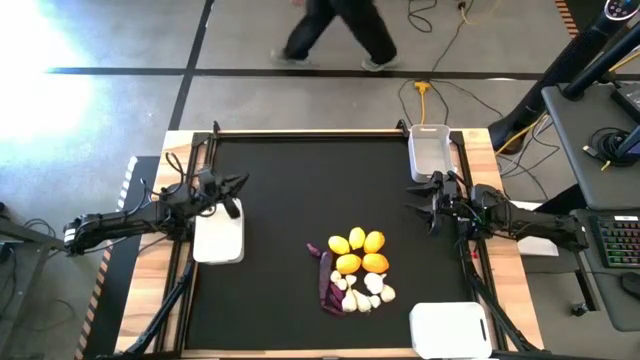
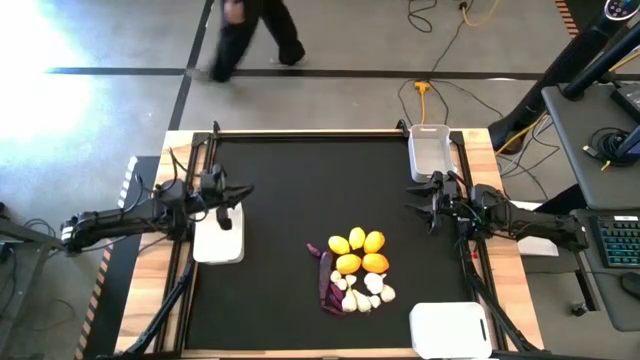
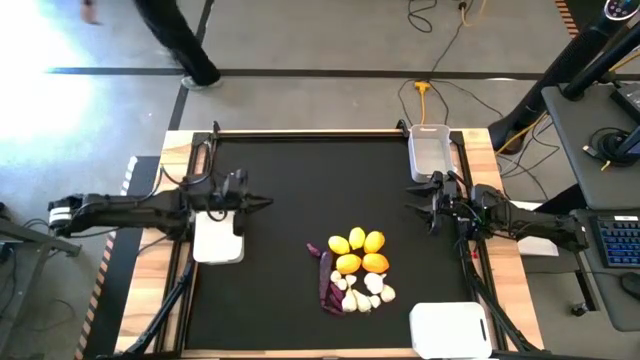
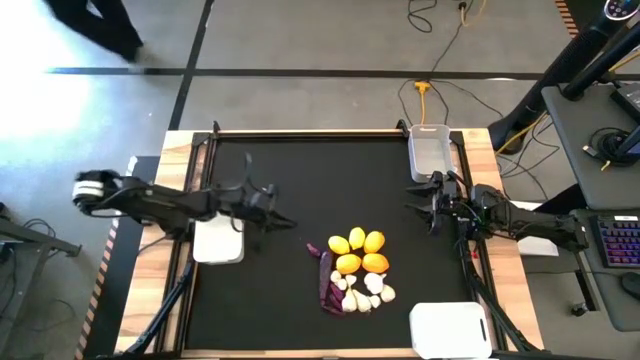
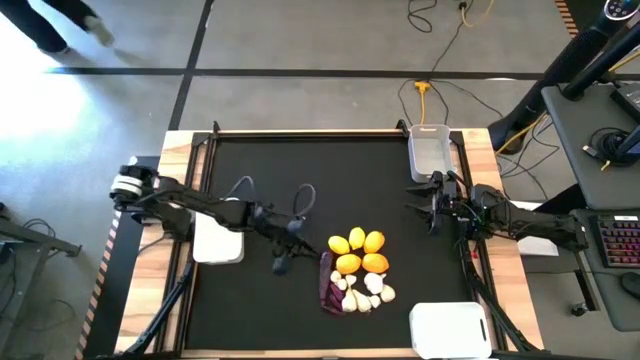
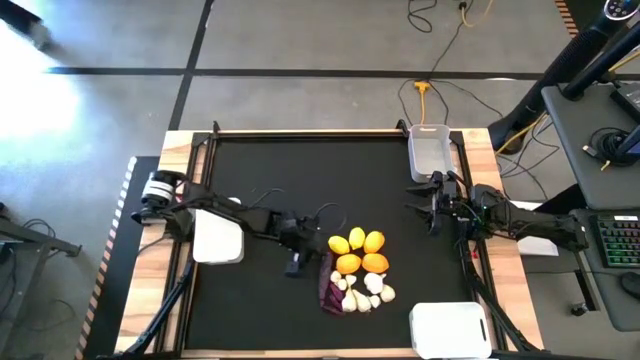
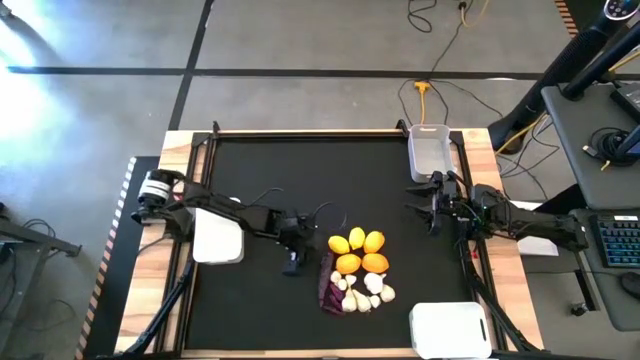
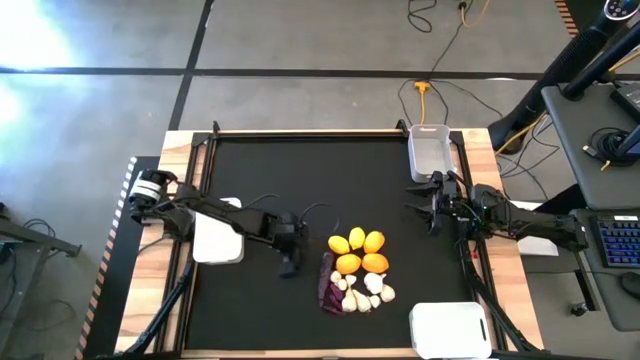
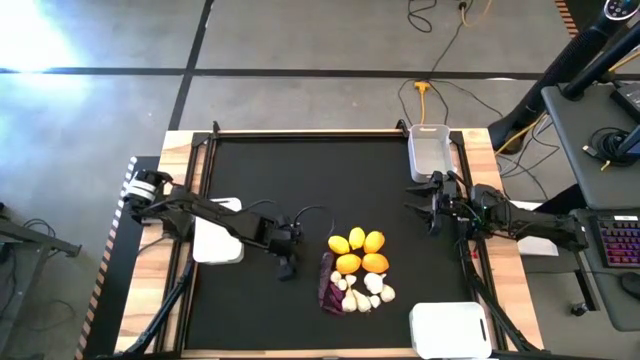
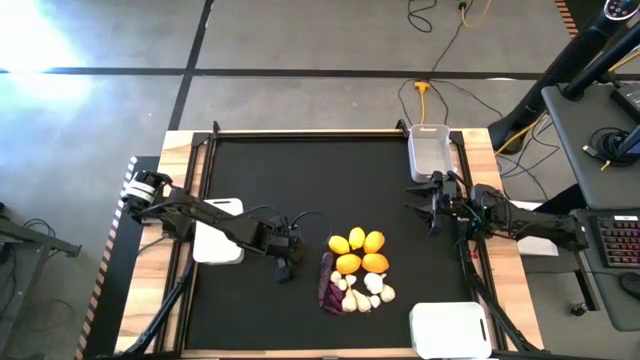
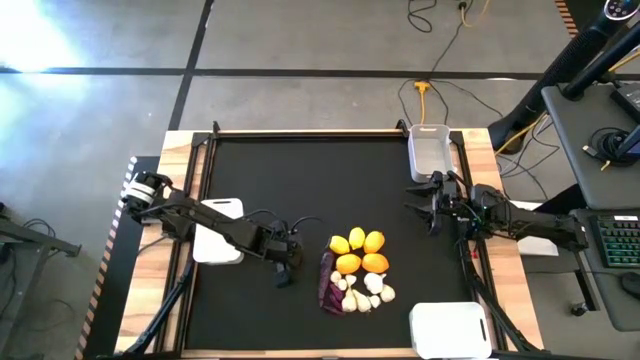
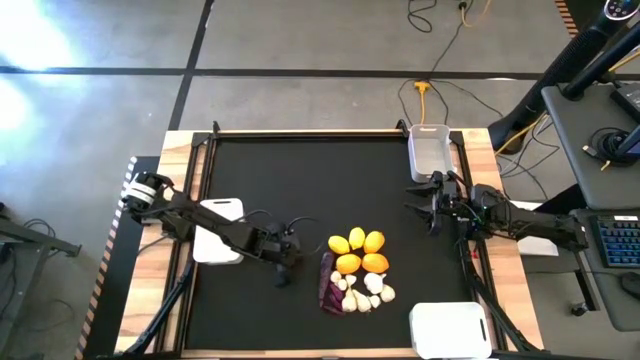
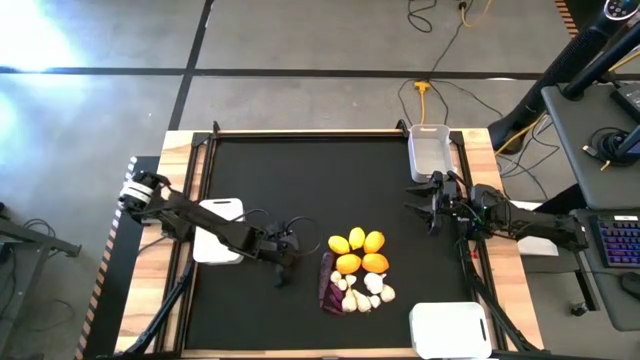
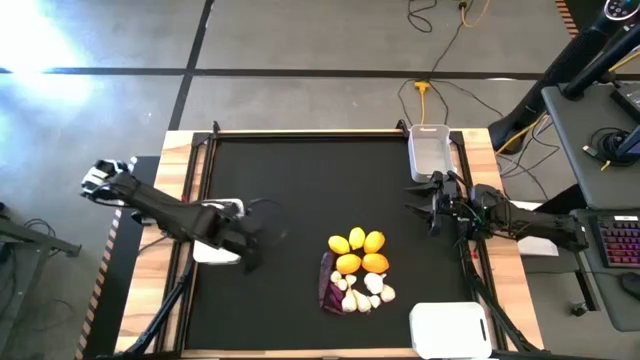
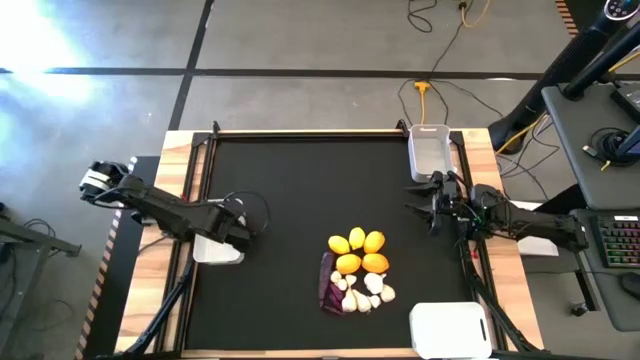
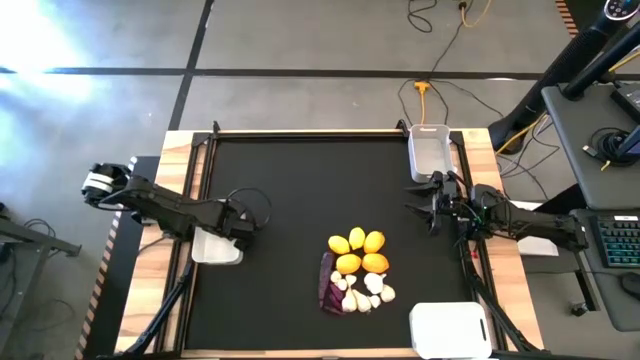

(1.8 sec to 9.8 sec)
Task: Sort produce into baskets
Put the eggplant into the top white bin

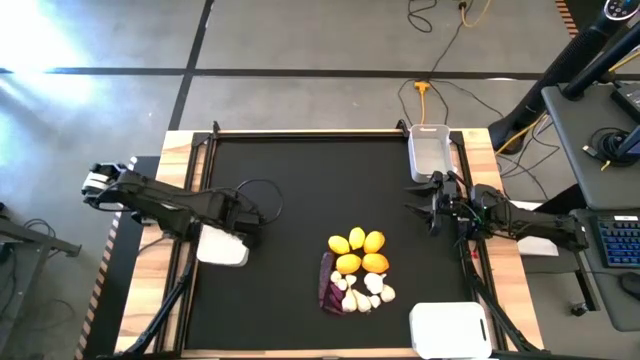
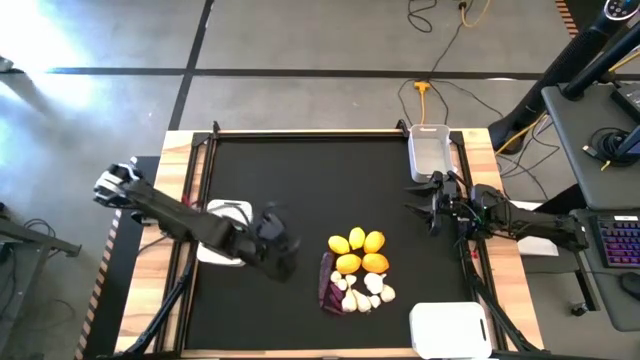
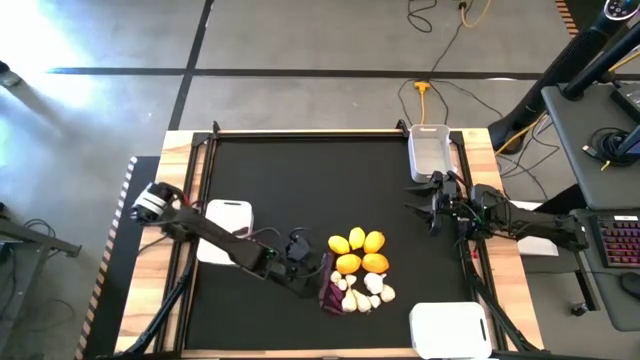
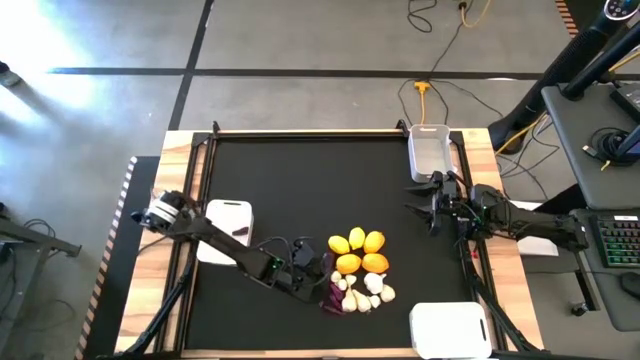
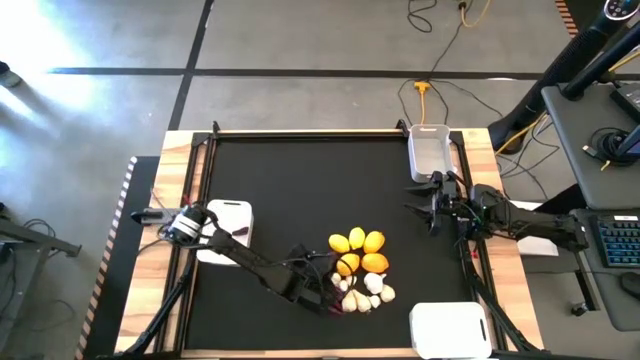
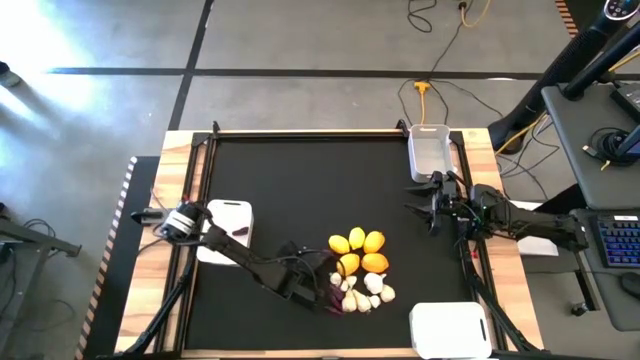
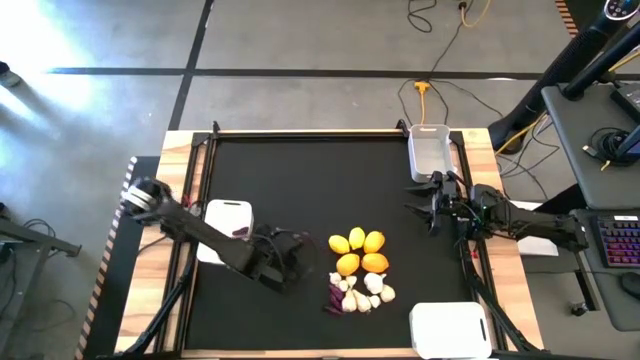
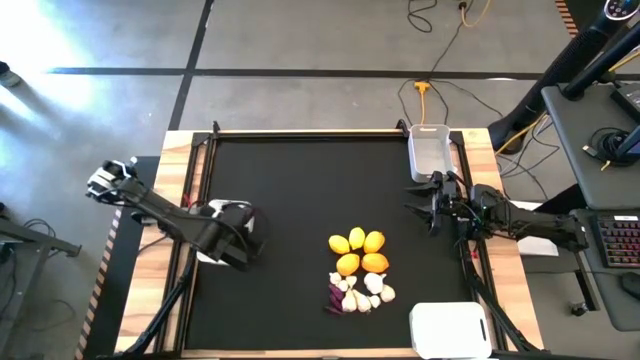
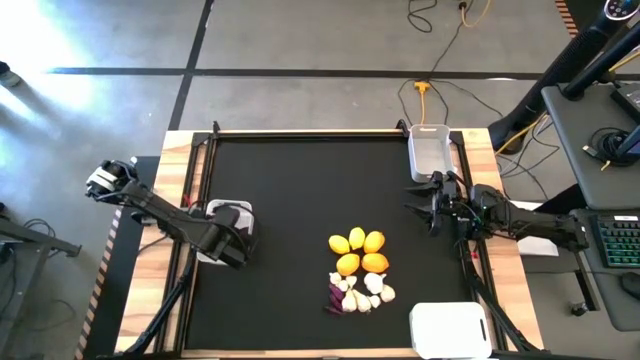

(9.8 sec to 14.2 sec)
Put the eggplant into the top white bin

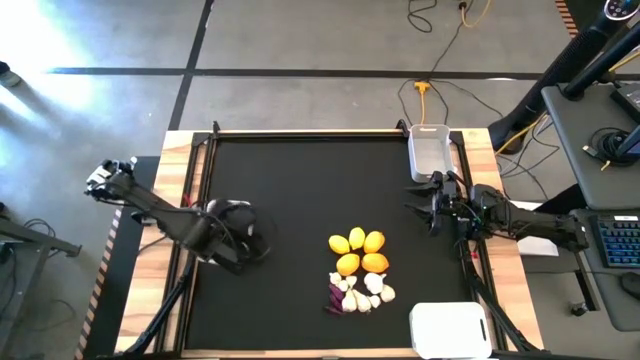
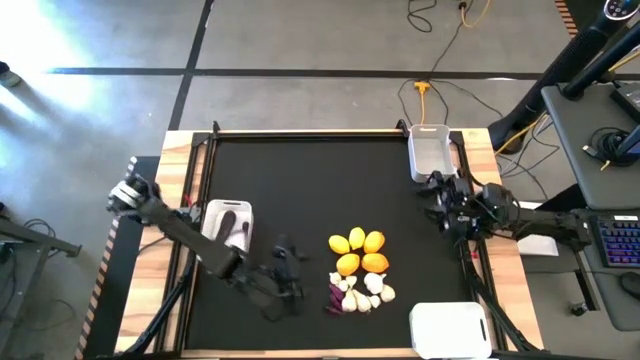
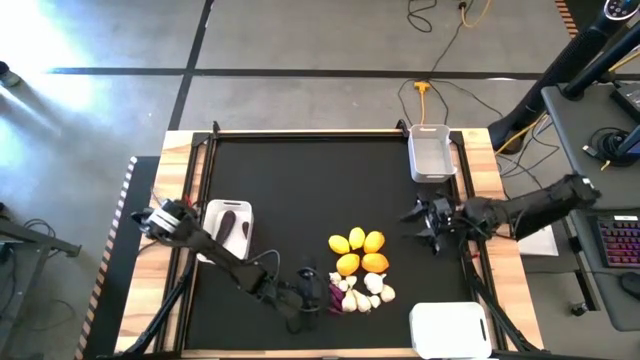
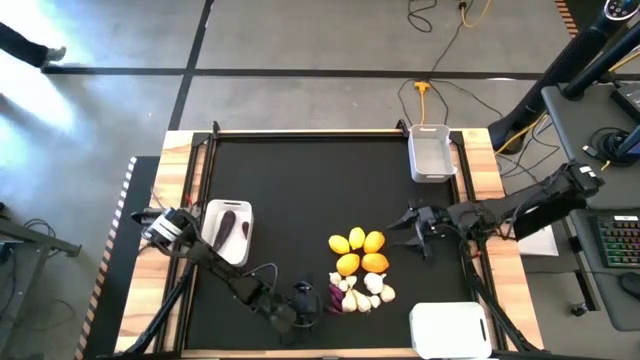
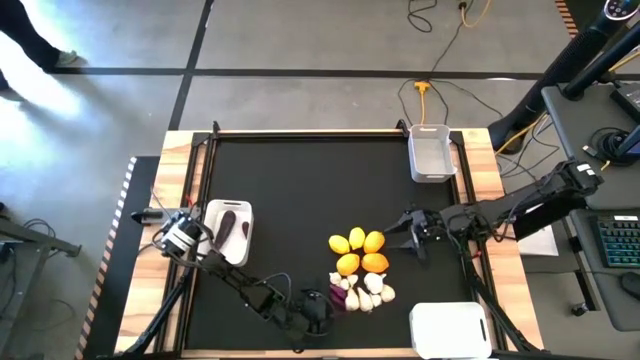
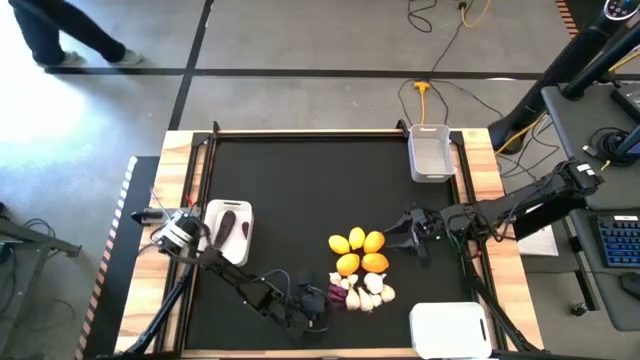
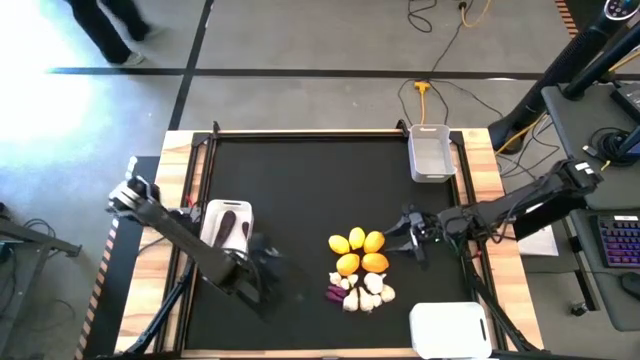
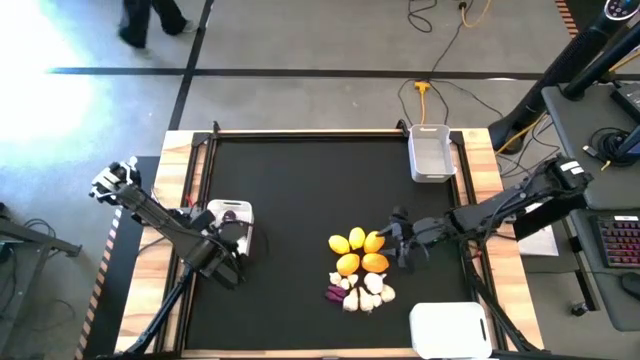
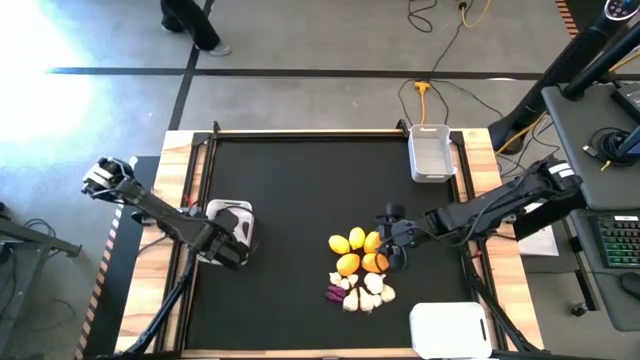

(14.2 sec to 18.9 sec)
Put the eggplant into the top white bin

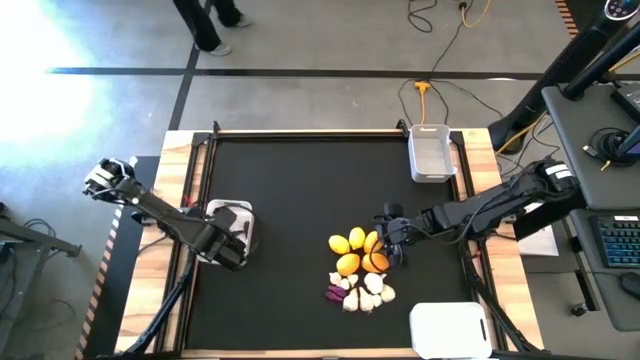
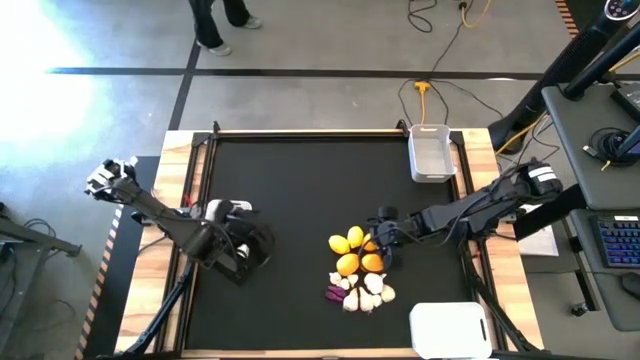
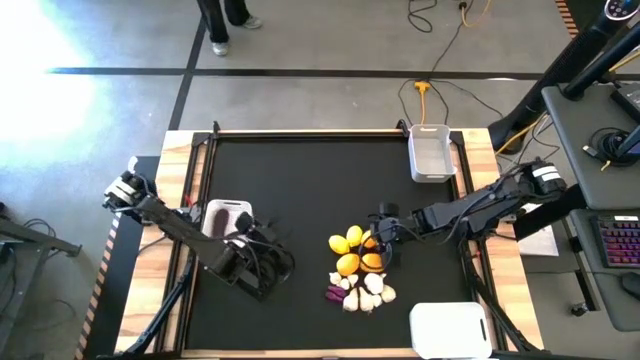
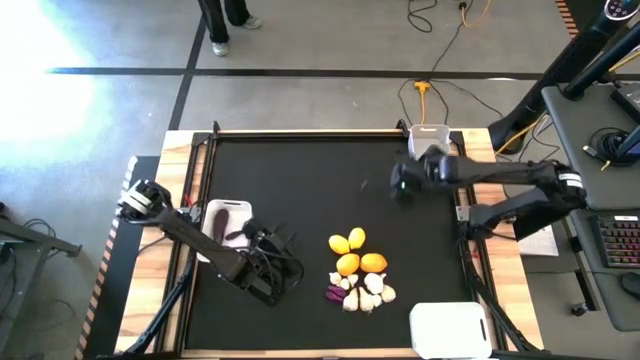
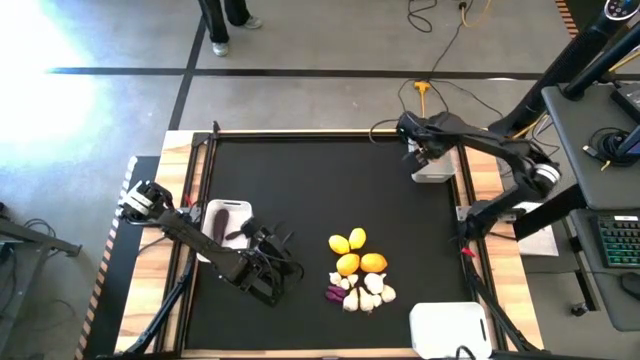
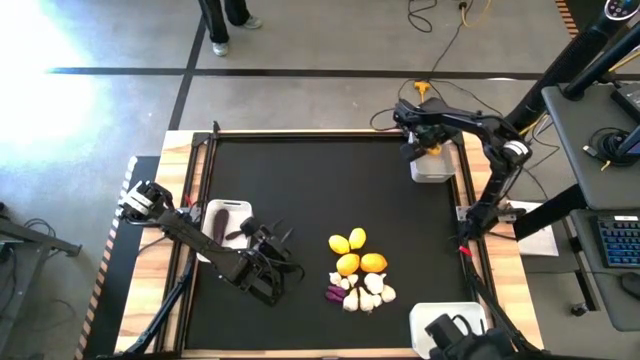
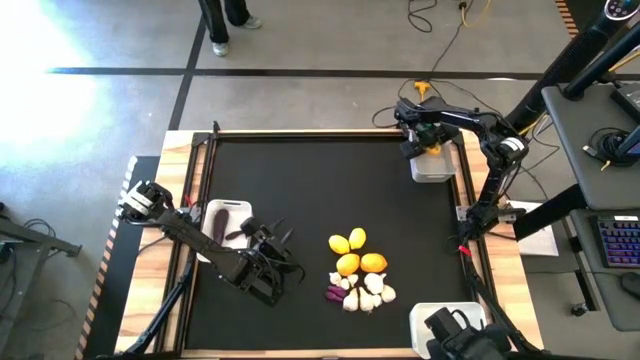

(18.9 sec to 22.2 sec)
Put the lemon into the gray bin

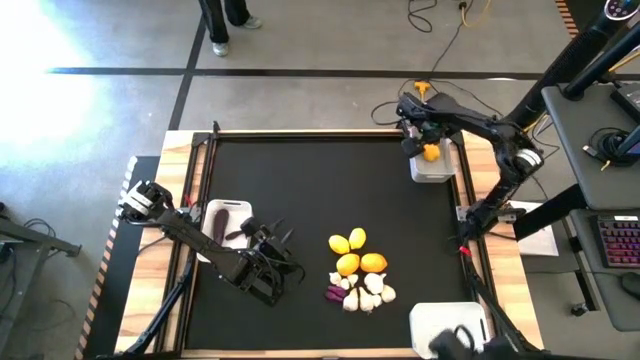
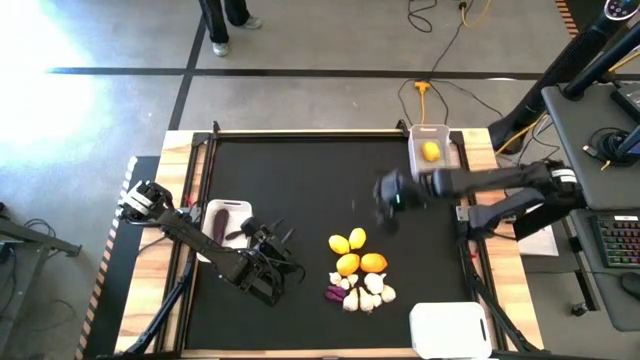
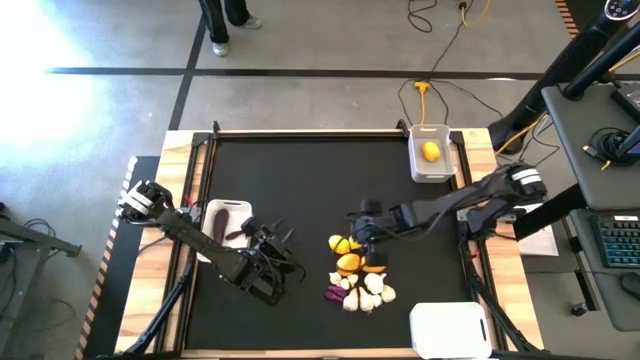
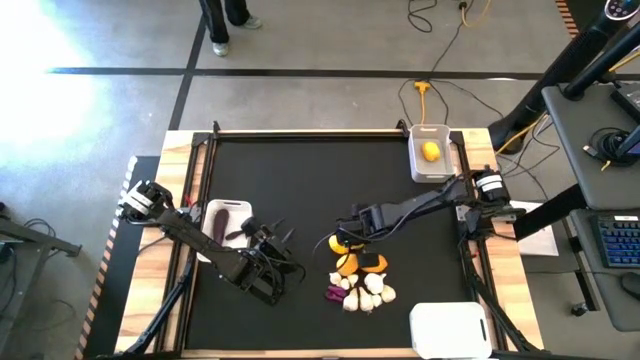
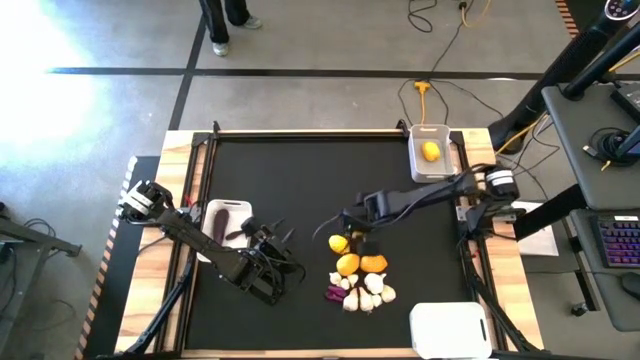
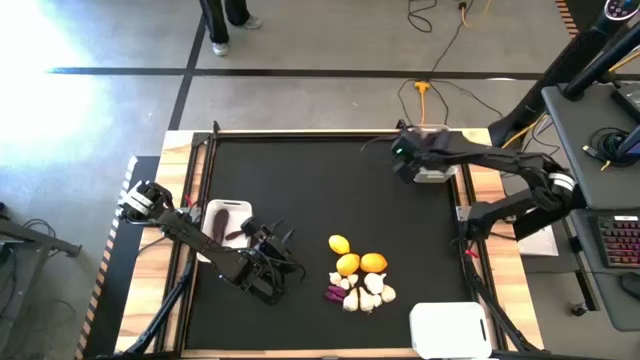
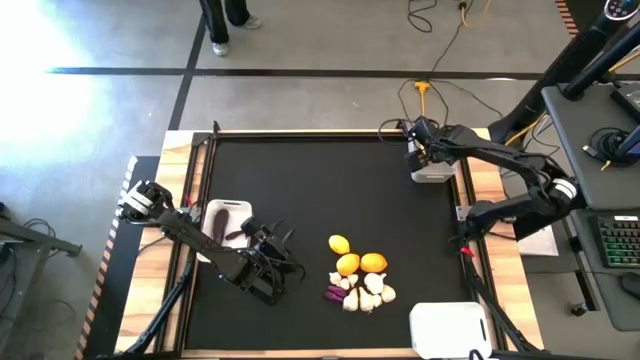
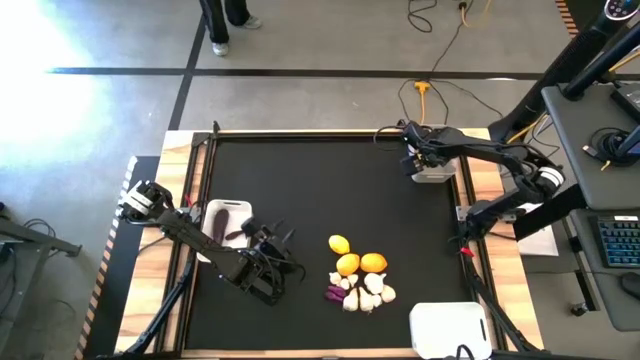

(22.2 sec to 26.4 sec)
Put the lemon into the gray bin
